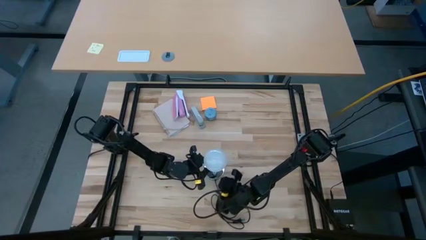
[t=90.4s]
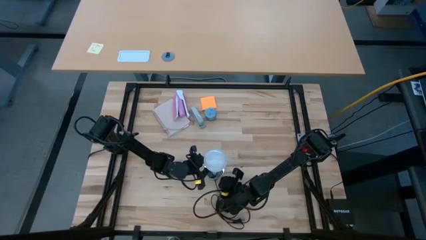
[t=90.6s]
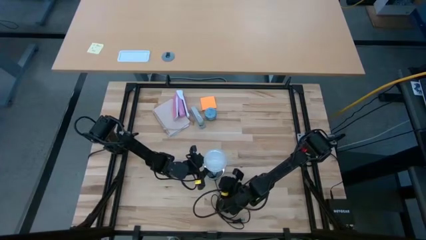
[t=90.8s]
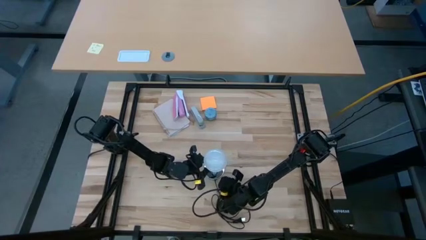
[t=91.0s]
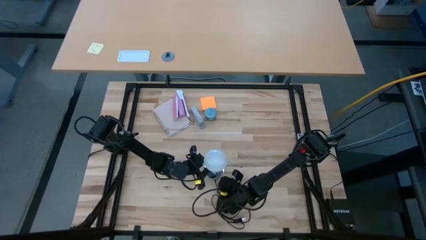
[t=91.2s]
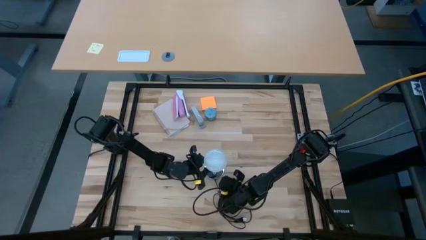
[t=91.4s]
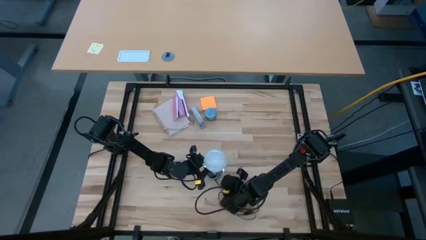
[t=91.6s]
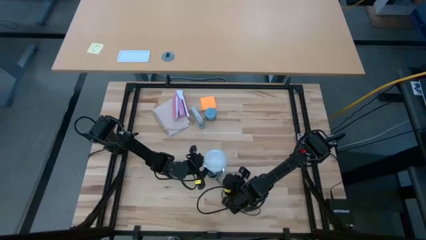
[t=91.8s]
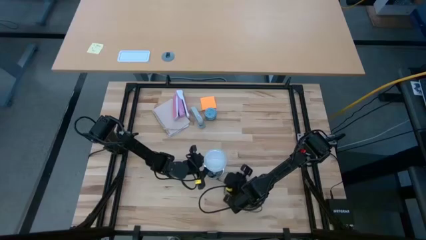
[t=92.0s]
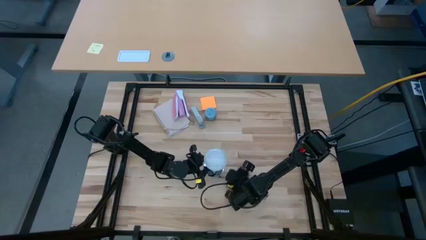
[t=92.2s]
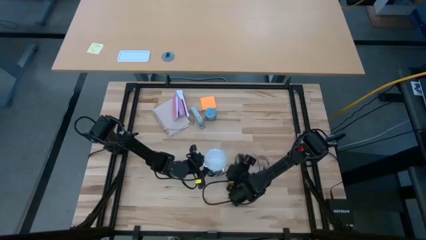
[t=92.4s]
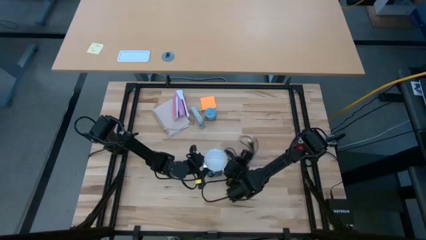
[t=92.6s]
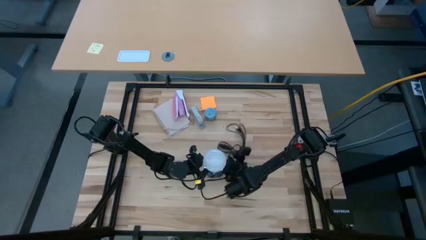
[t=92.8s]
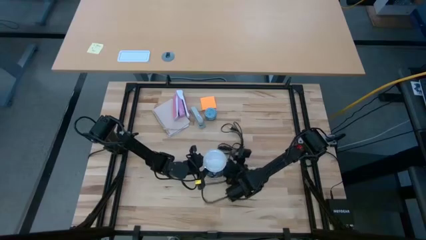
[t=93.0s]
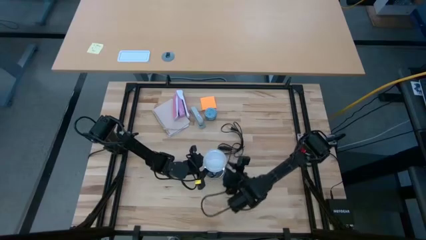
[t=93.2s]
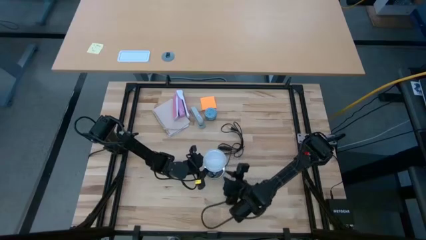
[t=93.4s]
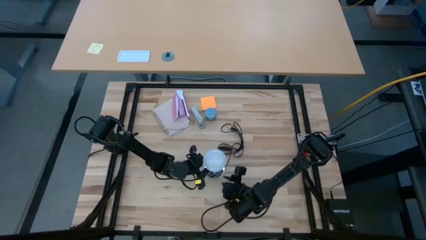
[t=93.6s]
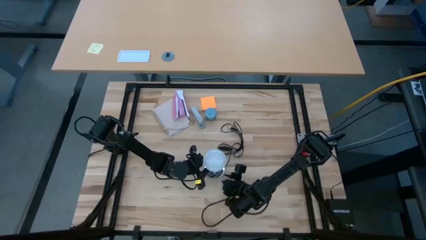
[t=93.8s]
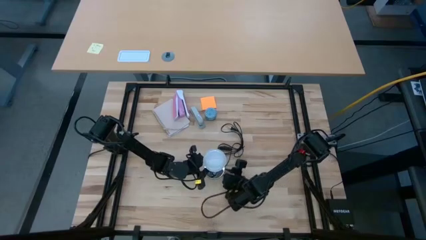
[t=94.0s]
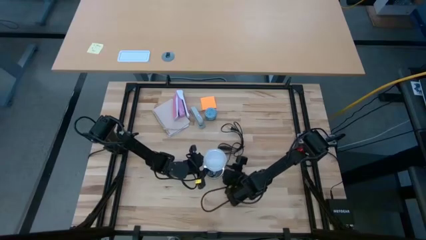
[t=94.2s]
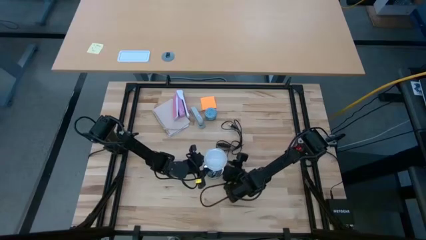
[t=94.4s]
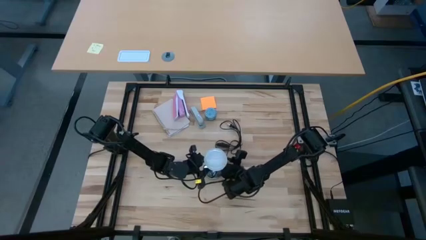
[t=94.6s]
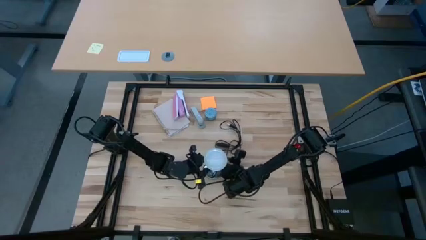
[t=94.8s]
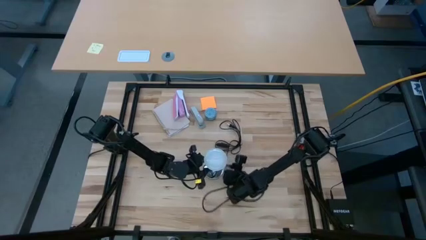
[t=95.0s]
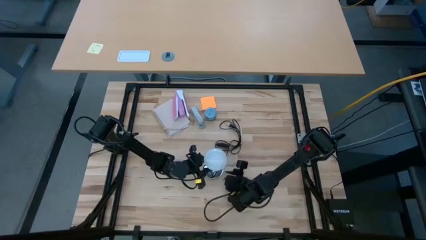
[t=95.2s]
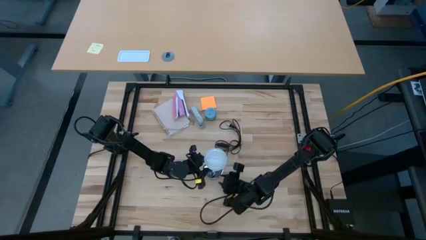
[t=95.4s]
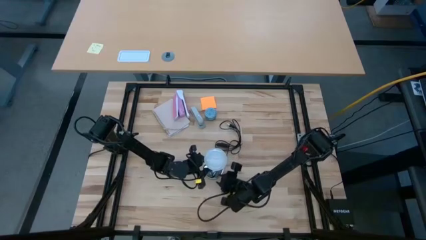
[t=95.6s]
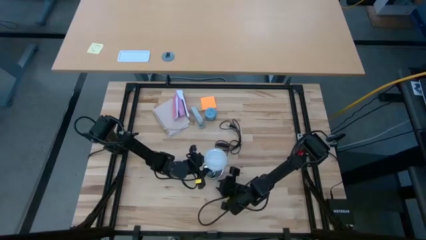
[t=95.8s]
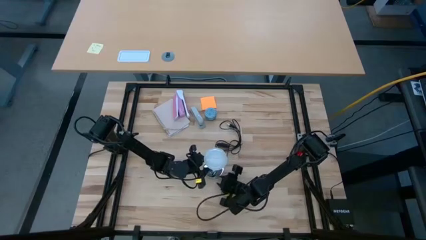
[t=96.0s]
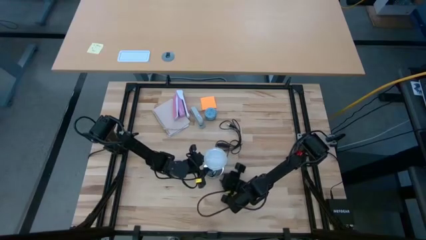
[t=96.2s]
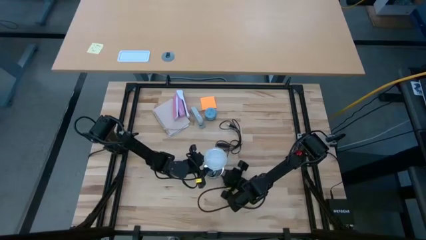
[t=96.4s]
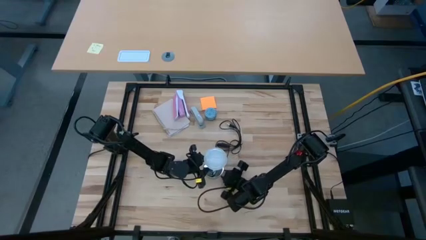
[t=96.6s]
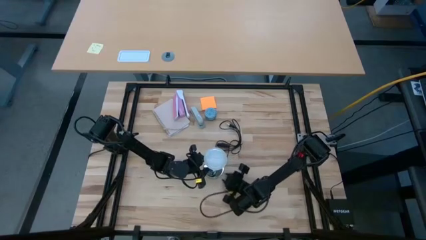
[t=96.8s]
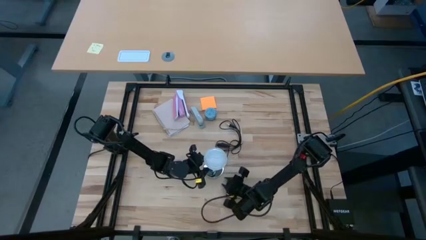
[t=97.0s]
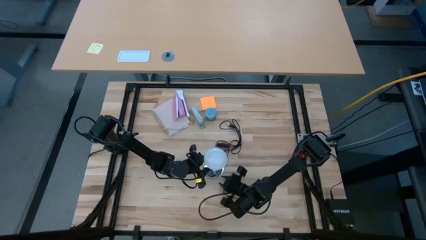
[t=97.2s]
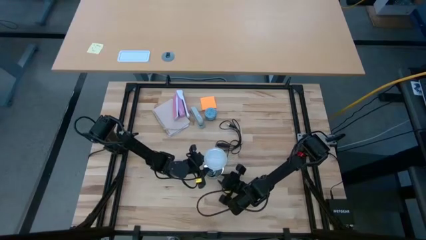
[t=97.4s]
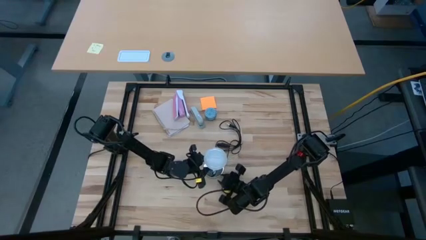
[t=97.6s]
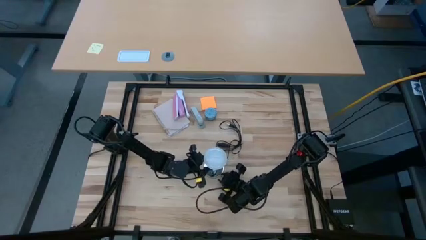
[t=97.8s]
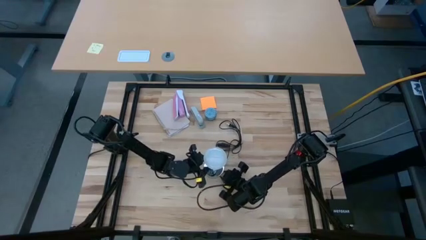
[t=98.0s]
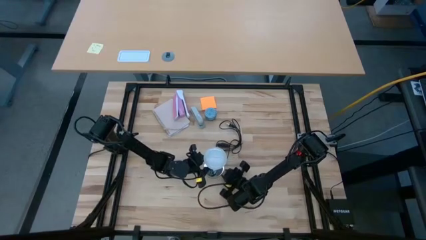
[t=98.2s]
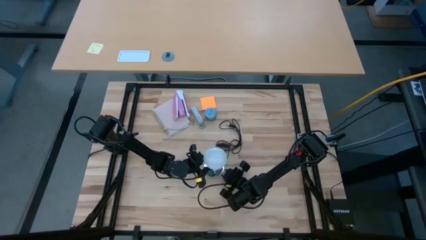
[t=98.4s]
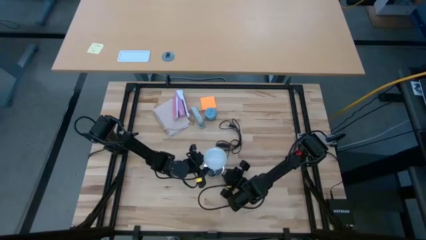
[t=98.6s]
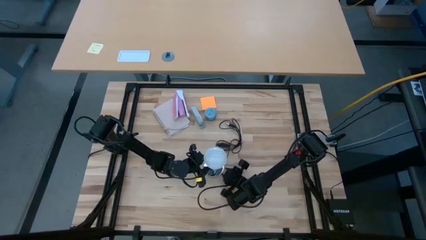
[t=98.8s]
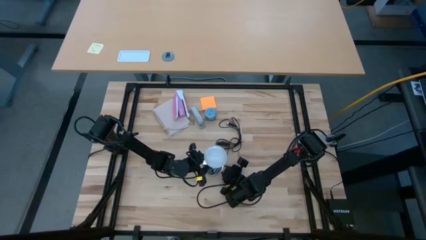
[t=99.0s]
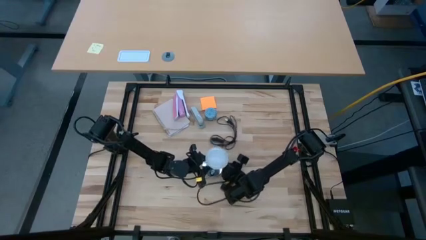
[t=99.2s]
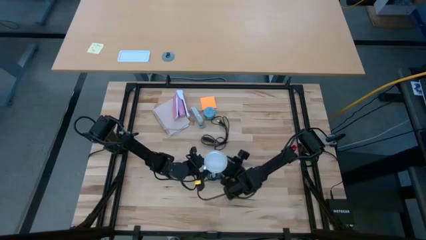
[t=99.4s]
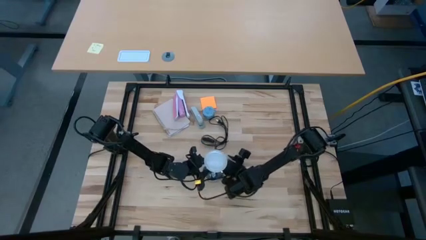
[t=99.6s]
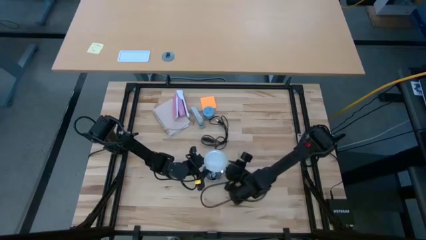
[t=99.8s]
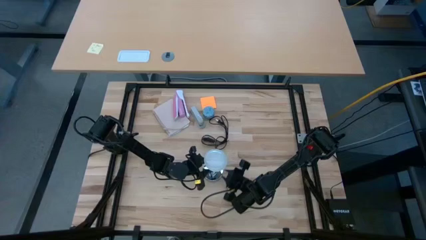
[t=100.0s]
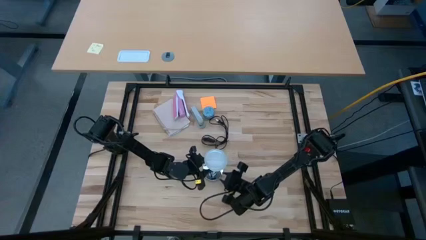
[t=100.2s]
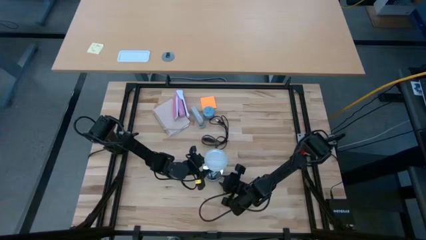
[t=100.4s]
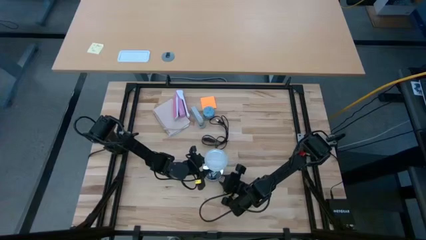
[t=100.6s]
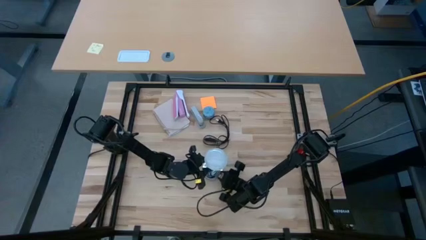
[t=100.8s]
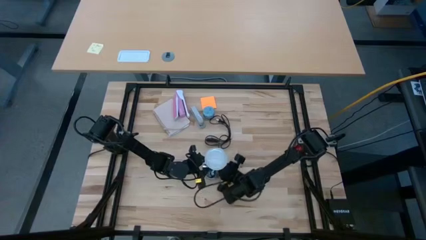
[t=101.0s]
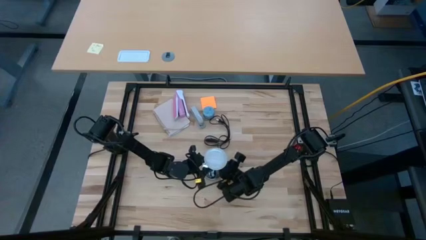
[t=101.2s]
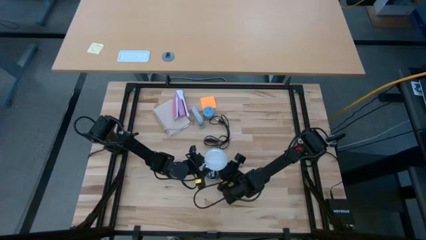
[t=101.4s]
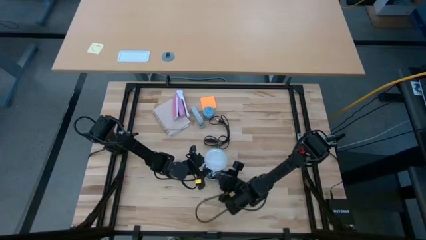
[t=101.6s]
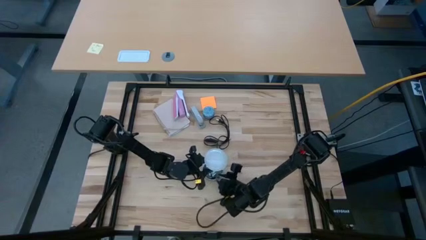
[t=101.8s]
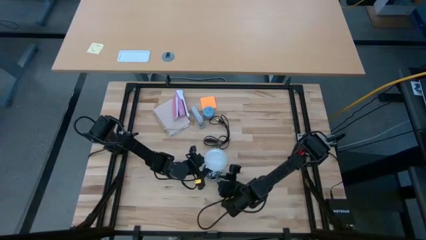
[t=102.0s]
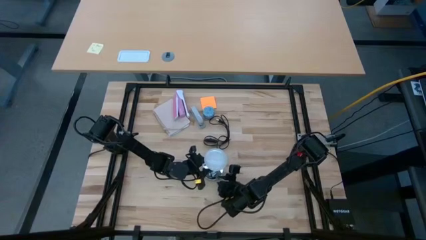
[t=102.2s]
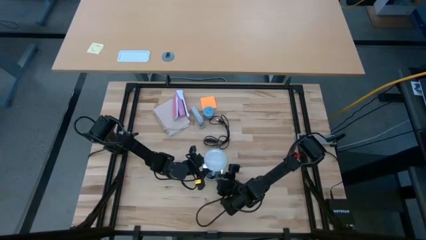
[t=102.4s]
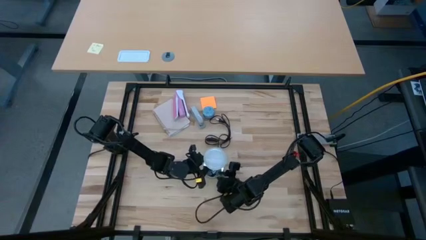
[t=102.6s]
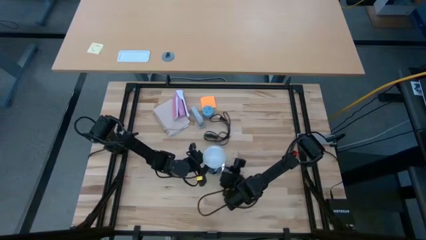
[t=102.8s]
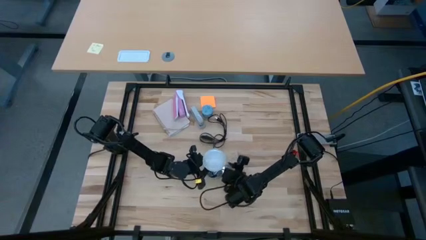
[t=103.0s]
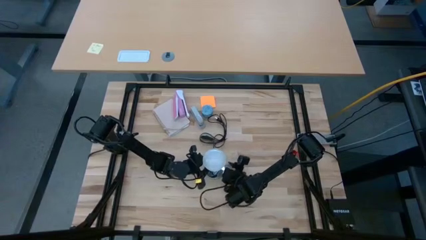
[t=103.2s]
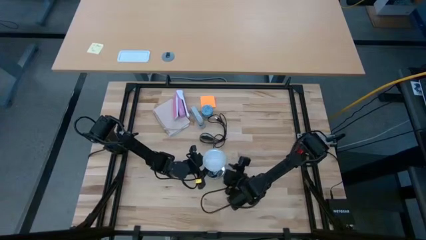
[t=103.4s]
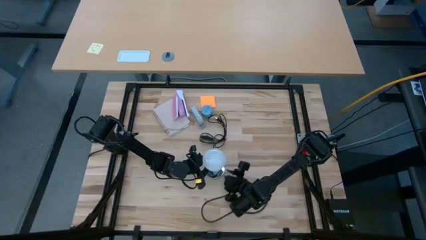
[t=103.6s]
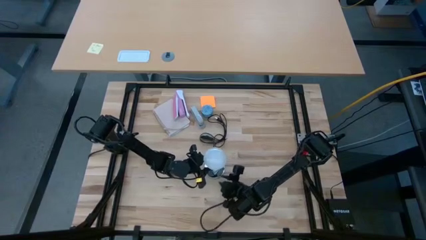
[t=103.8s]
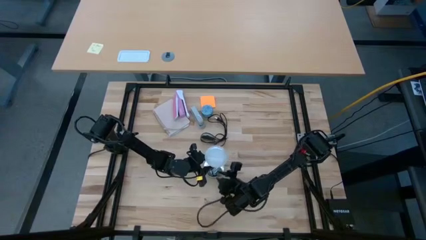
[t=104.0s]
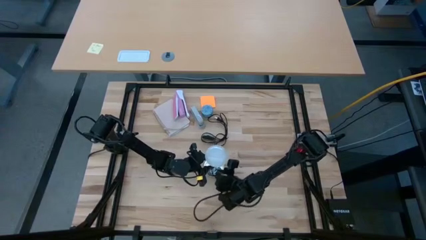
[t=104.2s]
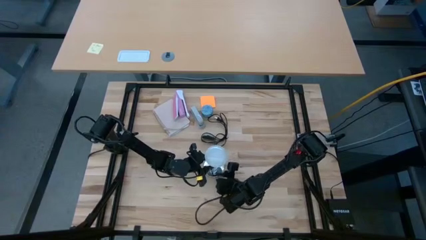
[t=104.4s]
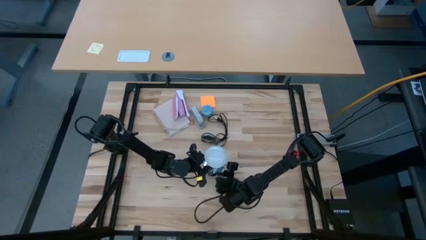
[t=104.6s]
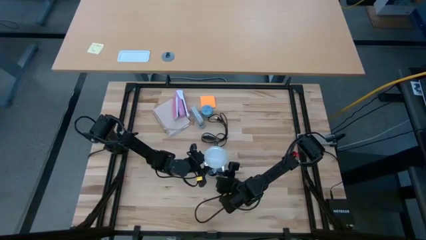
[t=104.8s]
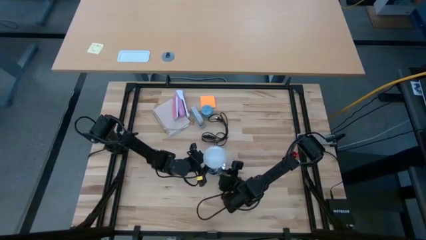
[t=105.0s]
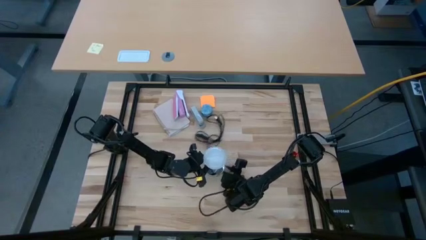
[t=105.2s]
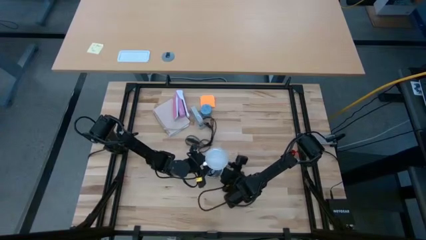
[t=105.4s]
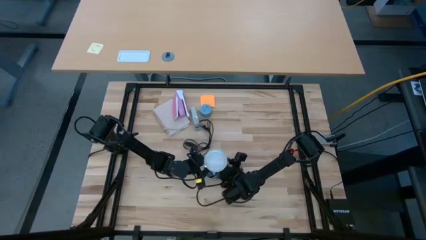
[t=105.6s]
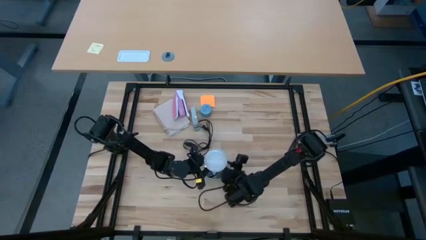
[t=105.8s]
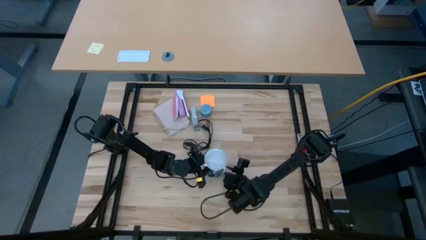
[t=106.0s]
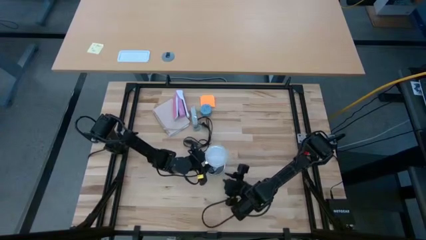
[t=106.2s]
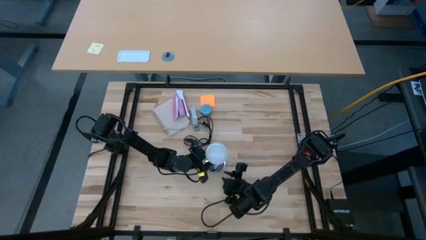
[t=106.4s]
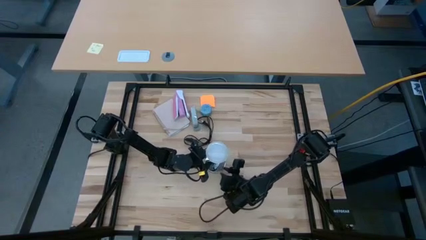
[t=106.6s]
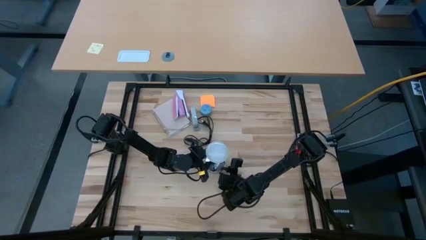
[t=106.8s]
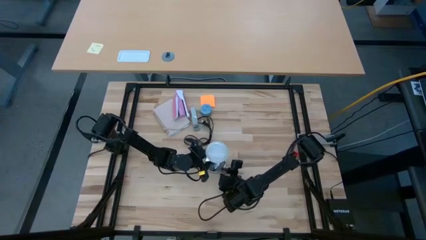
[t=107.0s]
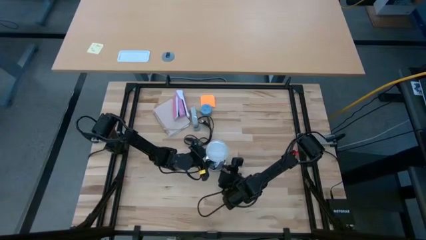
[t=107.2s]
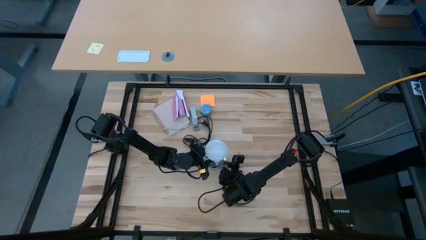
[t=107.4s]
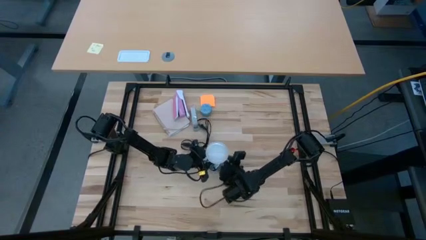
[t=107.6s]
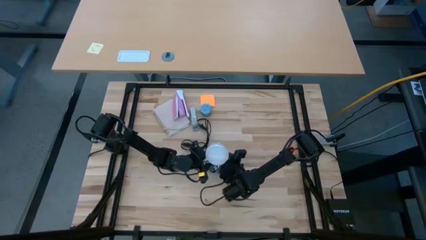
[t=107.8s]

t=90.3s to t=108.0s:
Task: Screw lightbulb
Insert the white lightbulb into the silver lamp
